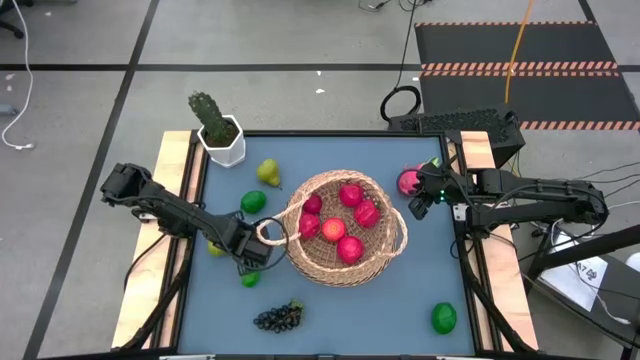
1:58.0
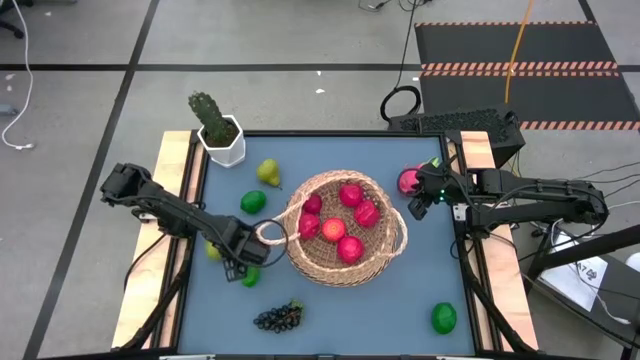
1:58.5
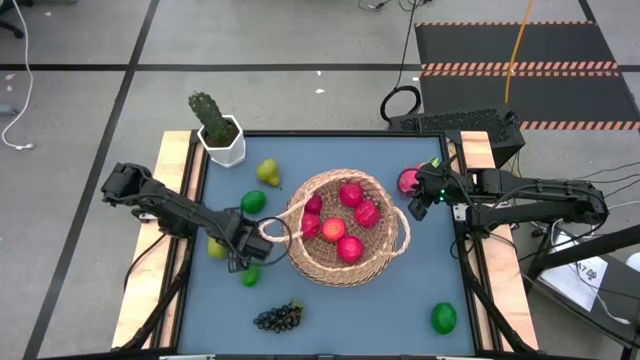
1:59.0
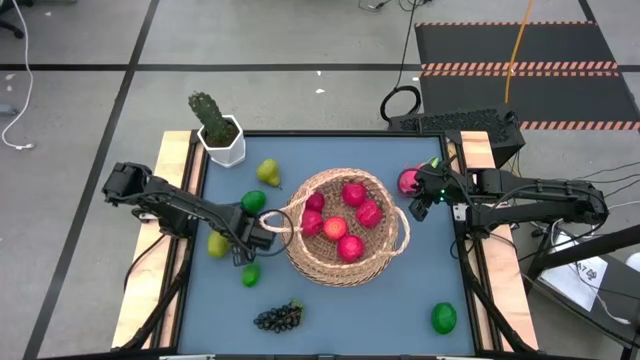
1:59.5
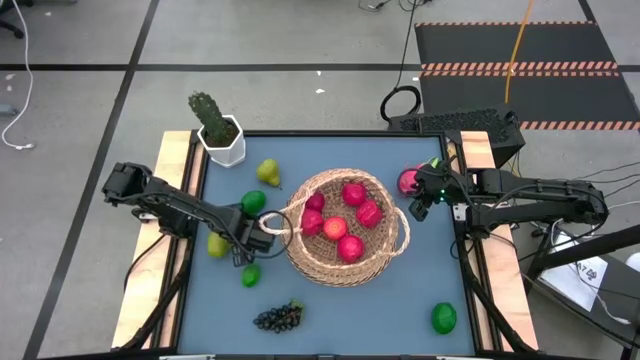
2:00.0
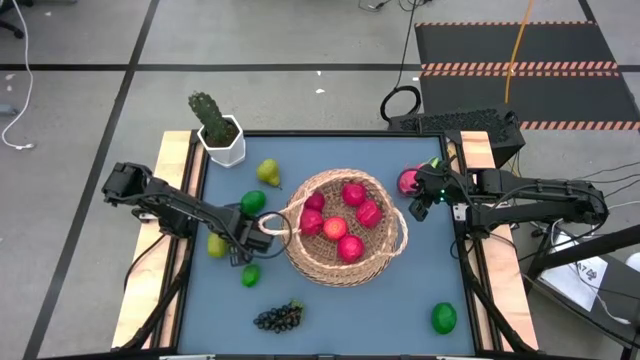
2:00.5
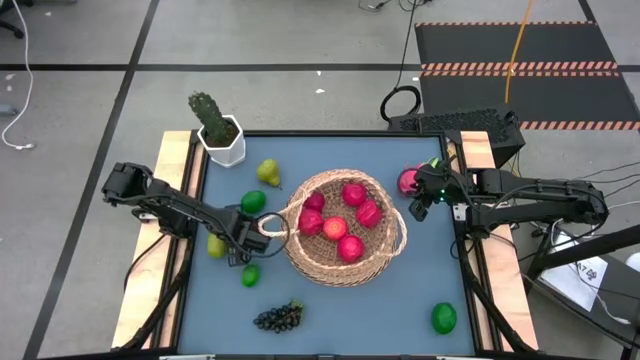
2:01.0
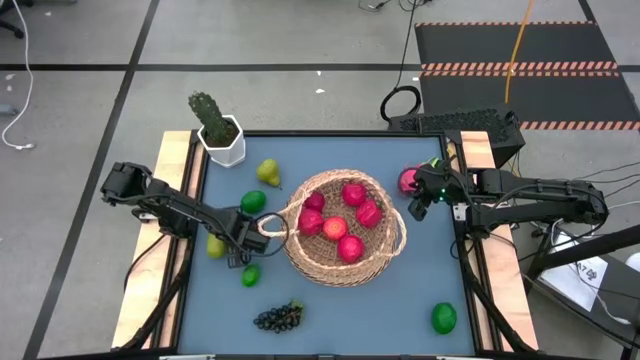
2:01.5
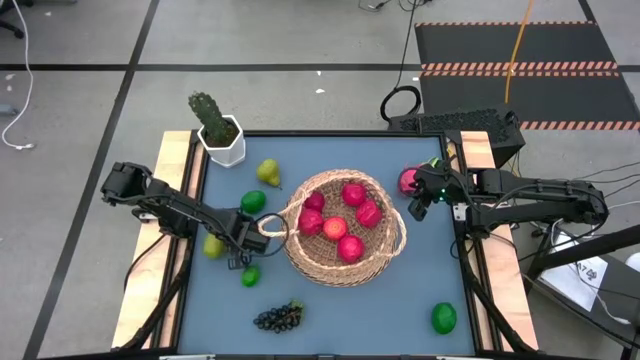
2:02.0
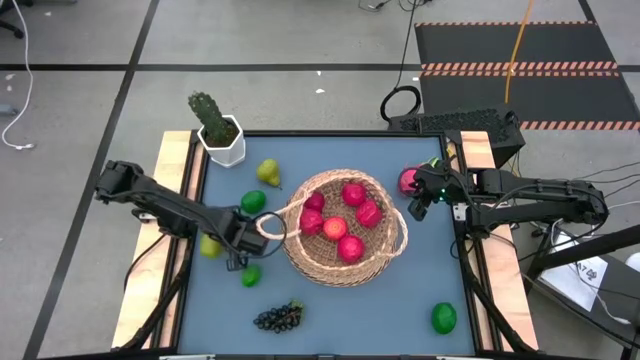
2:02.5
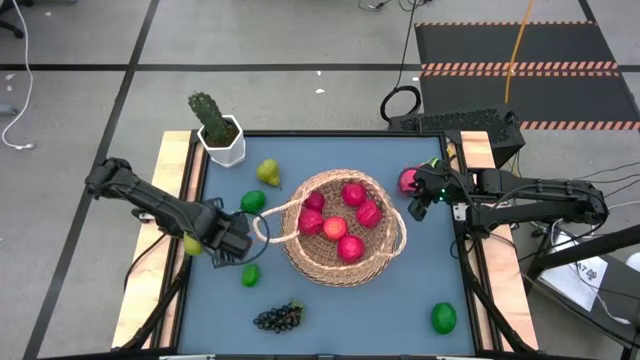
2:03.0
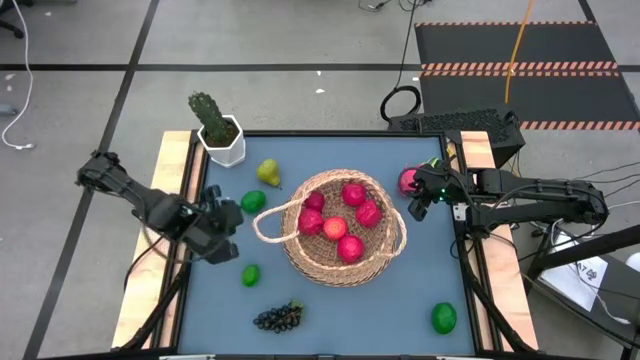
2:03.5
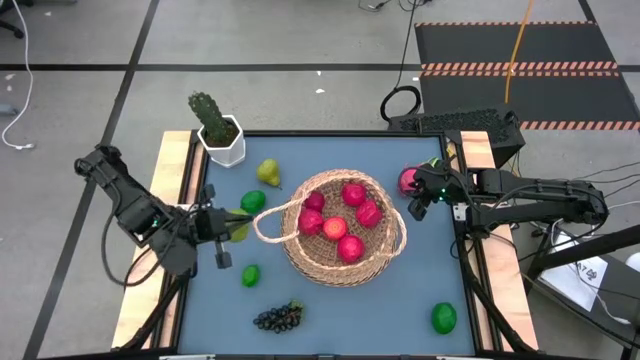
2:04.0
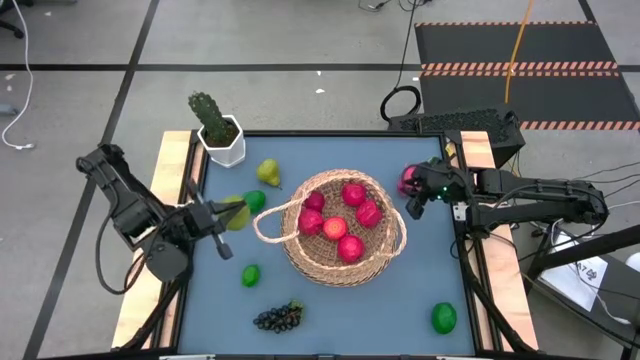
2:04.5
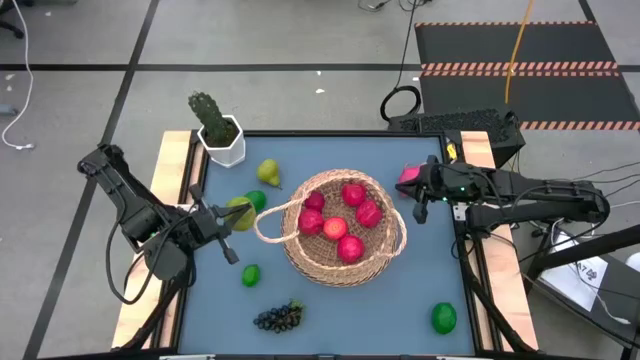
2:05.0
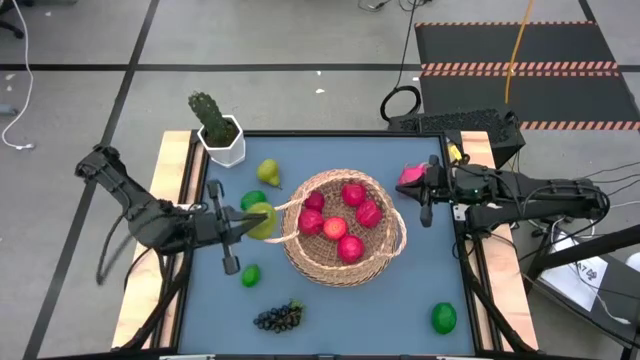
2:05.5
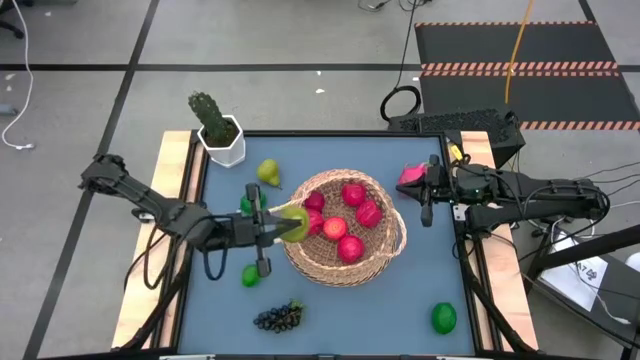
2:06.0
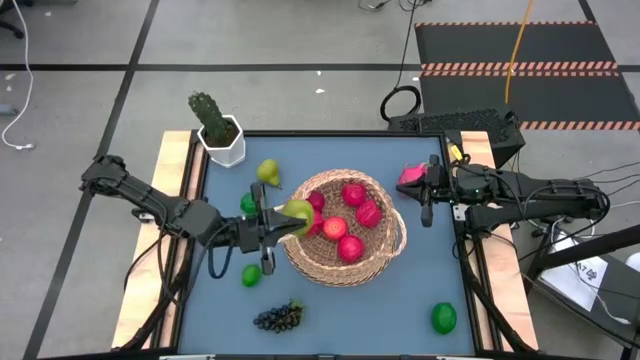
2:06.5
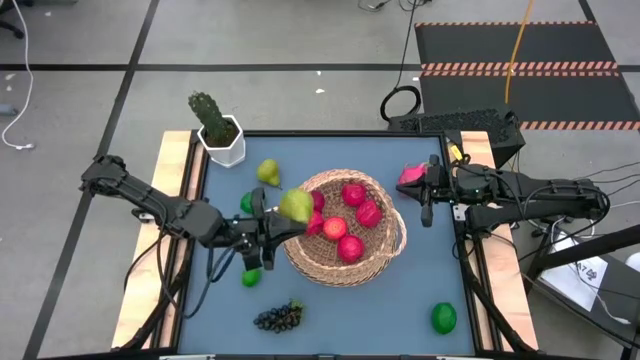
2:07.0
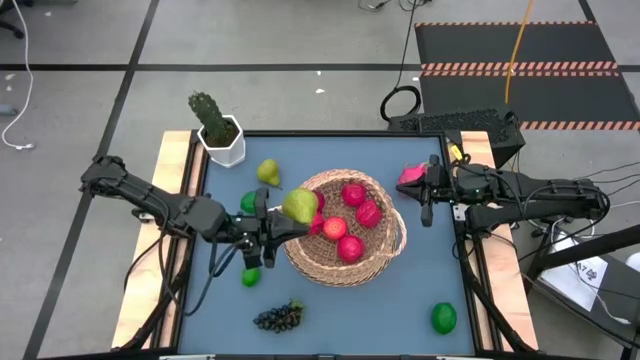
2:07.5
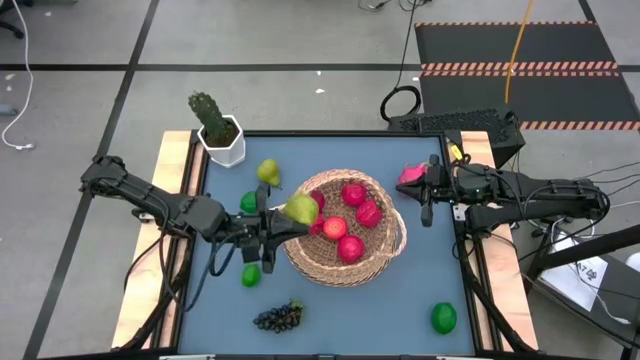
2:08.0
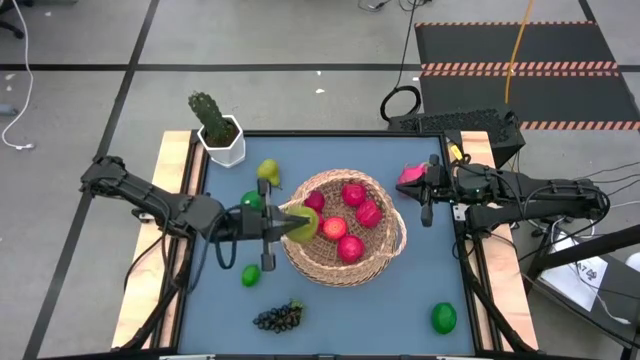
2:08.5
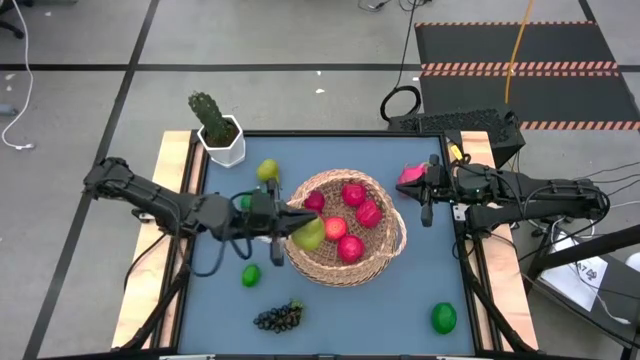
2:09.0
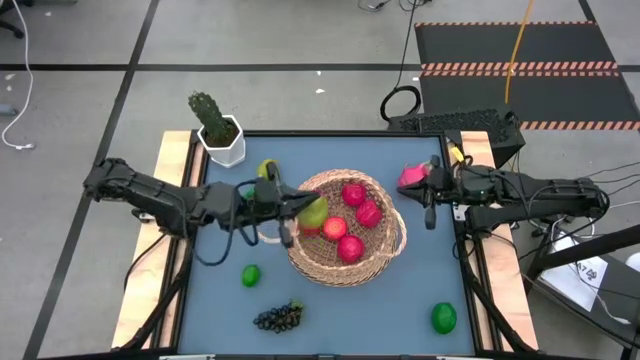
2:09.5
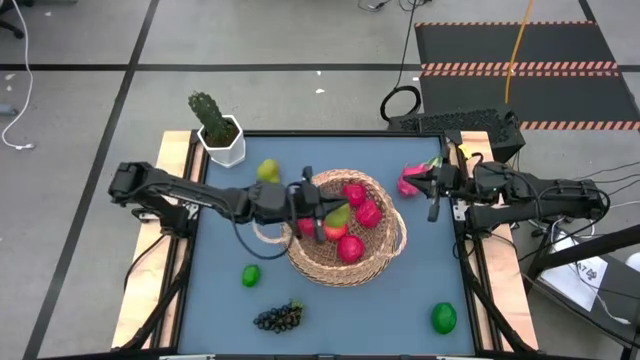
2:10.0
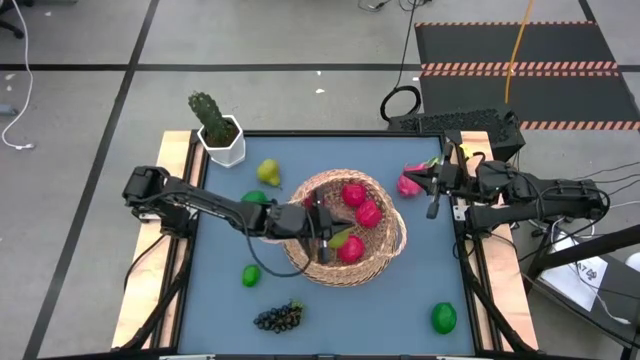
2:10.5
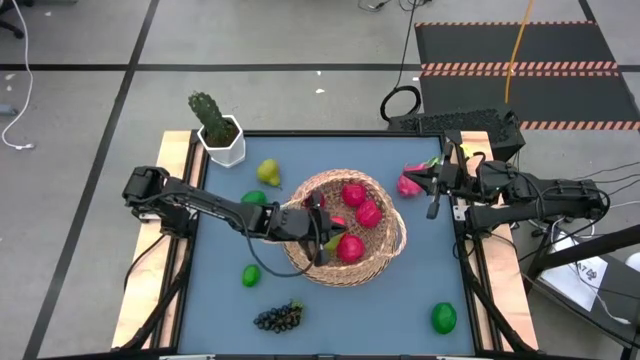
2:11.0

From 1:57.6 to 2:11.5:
Task: Build produce basket
Put the bottom light green pear into the brown basket

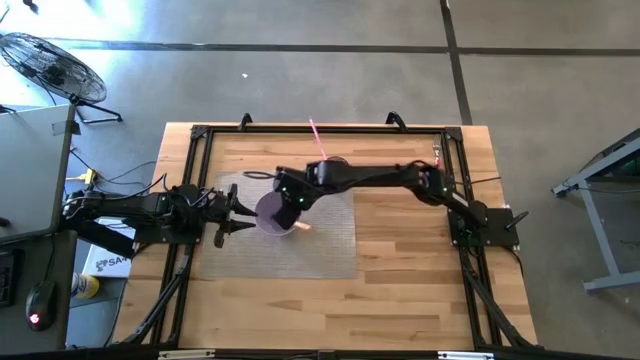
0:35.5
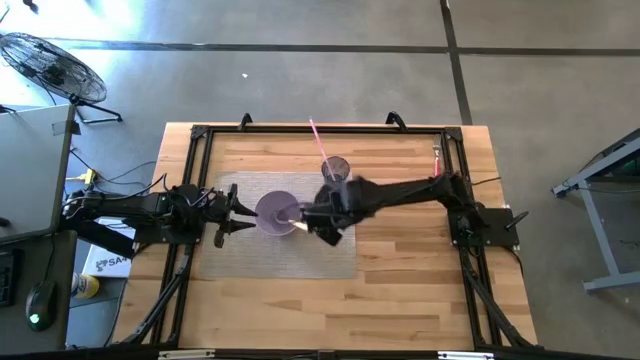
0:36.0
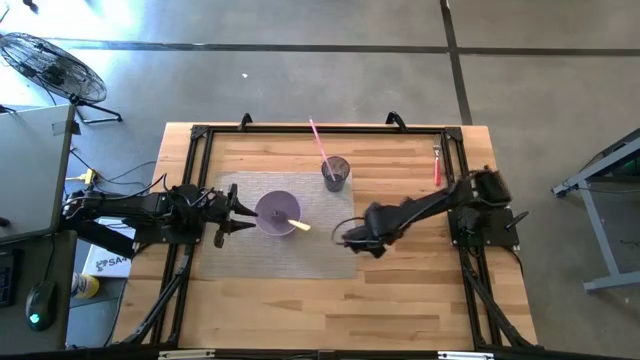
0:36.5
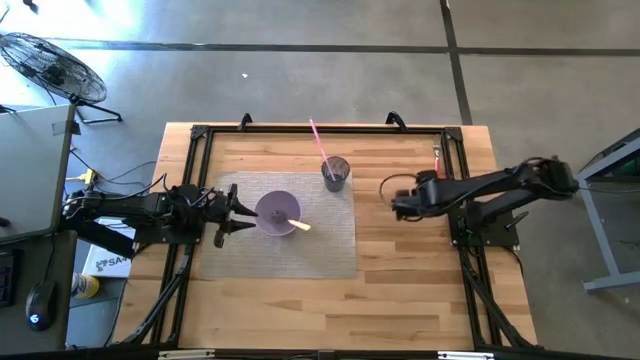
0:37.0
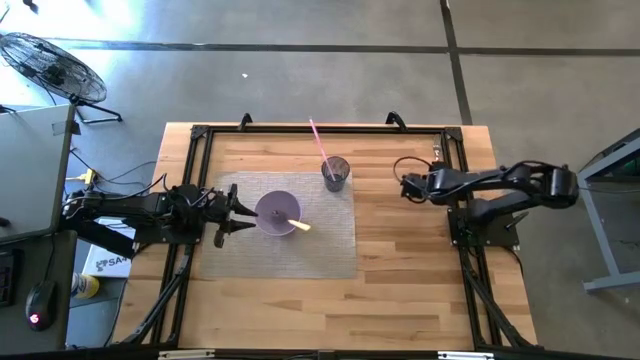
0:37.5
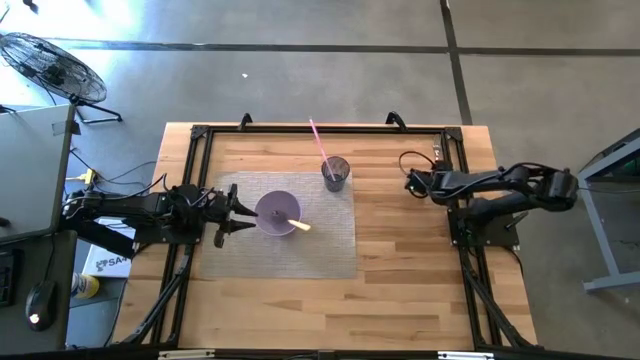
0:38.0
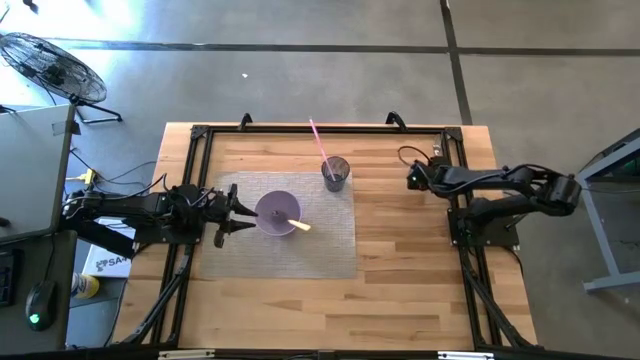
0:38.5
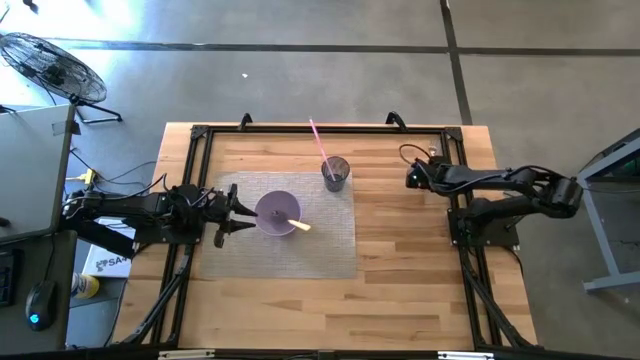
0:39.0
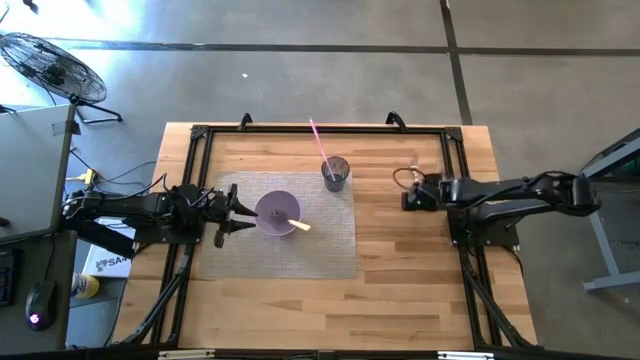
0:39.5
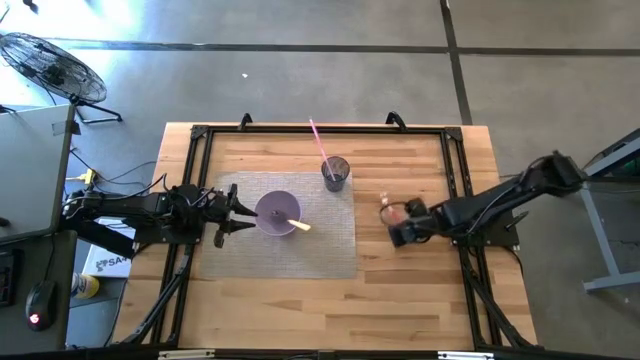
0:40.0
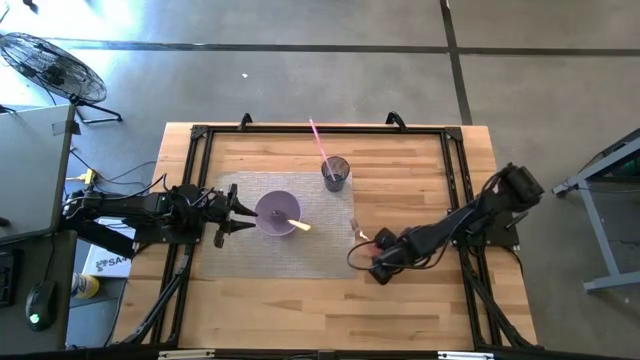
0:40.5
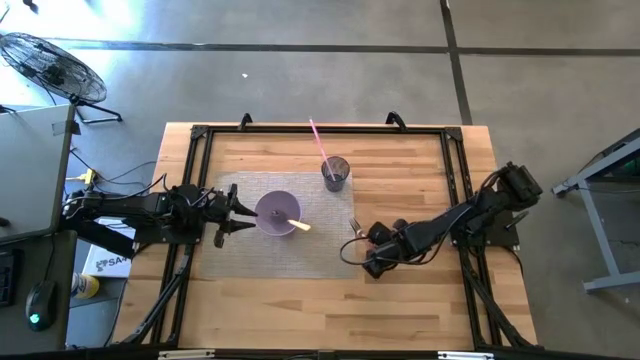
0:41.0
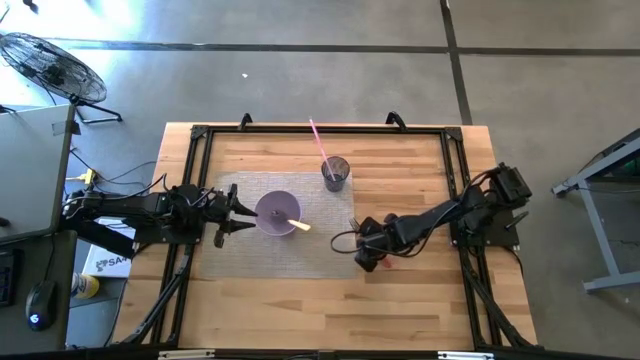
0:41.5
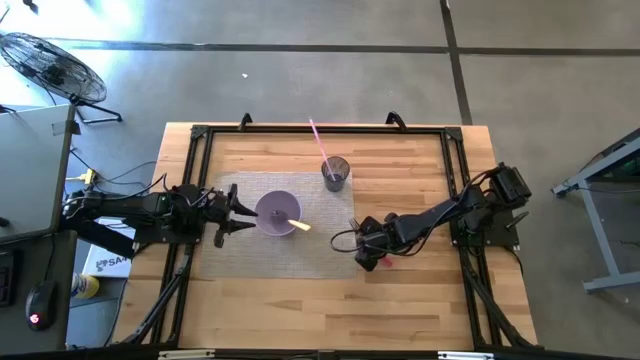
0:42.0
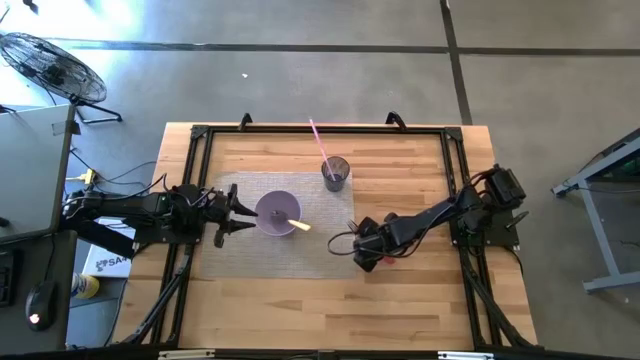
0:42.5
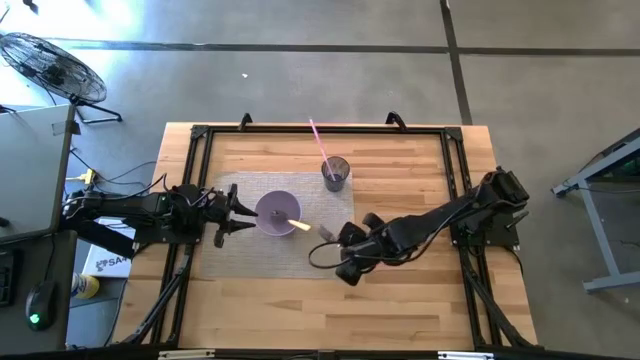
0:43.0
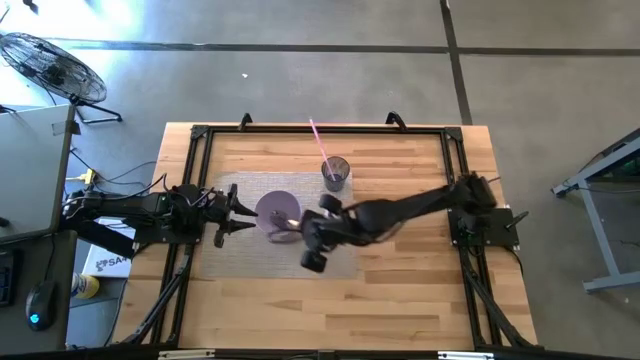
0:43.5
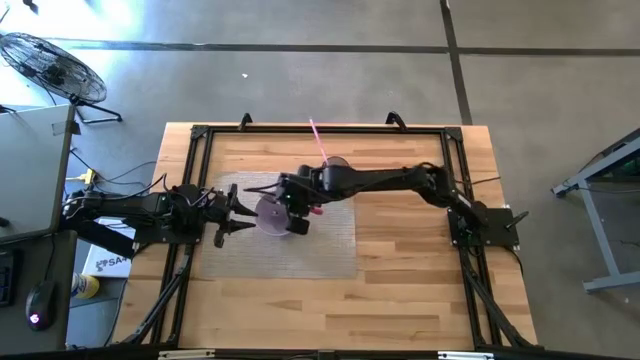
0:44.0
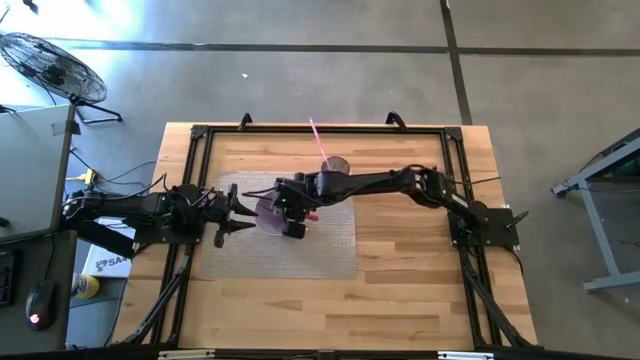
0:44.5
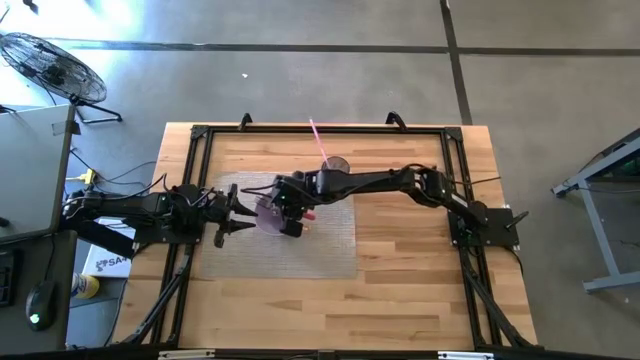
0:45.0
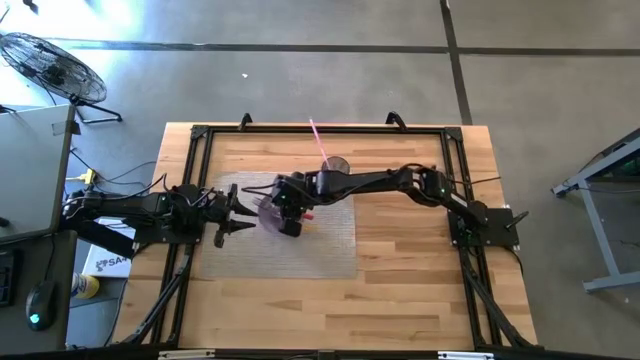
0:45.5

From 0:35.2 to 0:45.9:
Task: Pick & Place Utensil
Put the pink fork into the purple bowl
